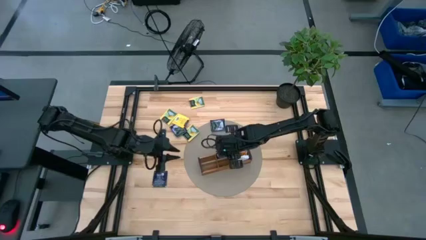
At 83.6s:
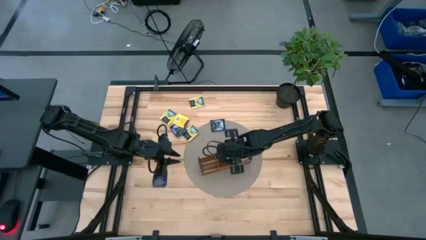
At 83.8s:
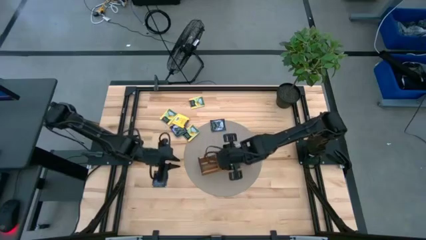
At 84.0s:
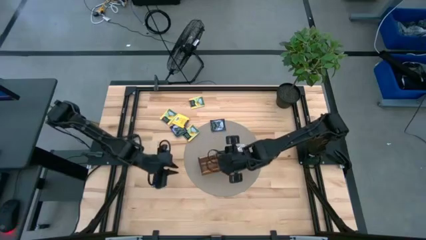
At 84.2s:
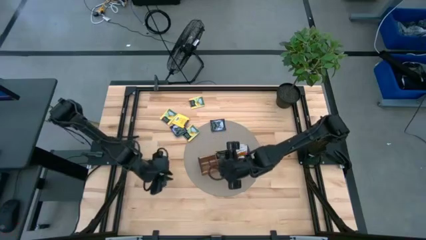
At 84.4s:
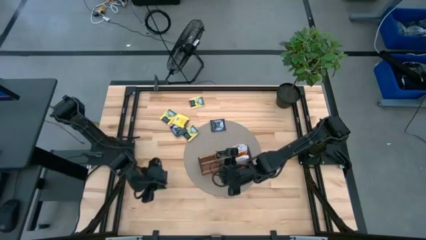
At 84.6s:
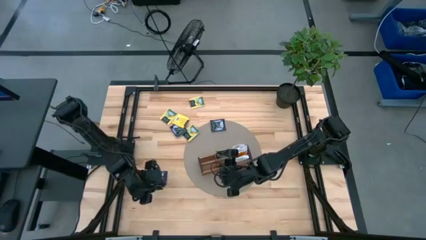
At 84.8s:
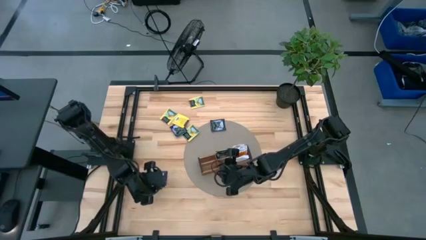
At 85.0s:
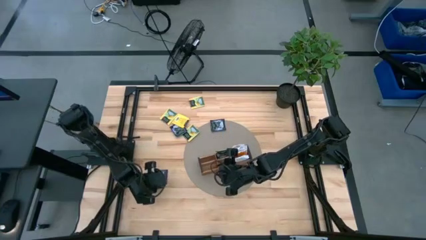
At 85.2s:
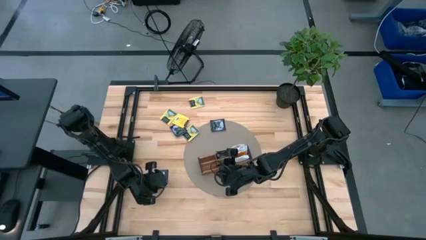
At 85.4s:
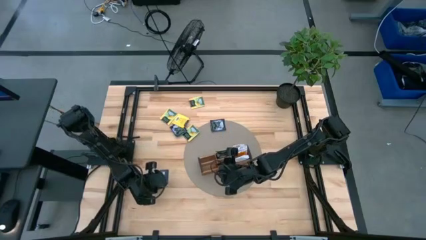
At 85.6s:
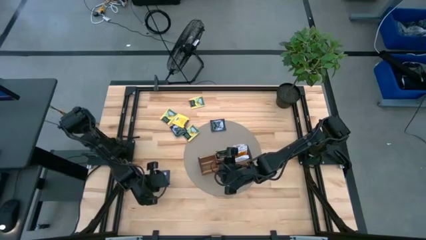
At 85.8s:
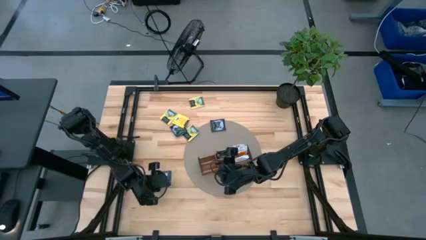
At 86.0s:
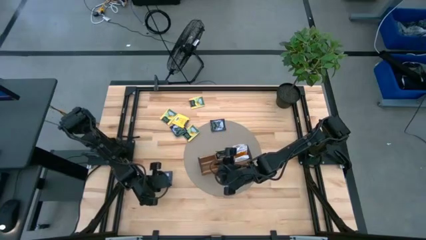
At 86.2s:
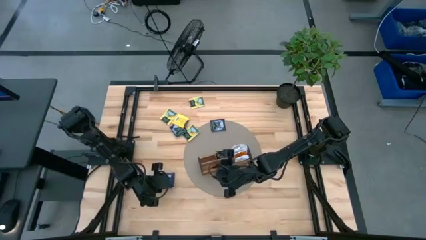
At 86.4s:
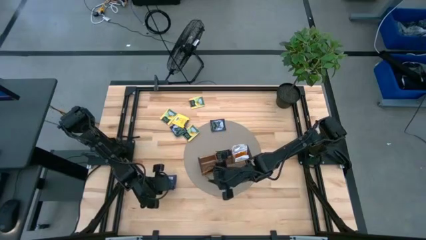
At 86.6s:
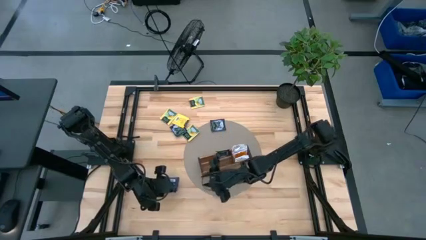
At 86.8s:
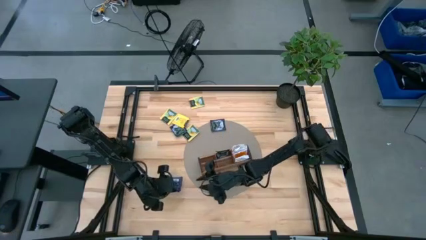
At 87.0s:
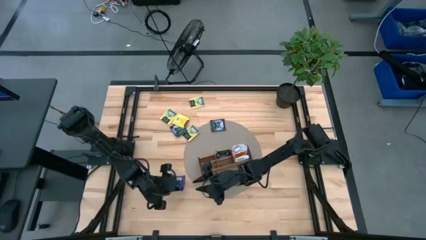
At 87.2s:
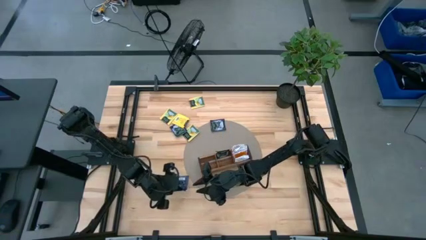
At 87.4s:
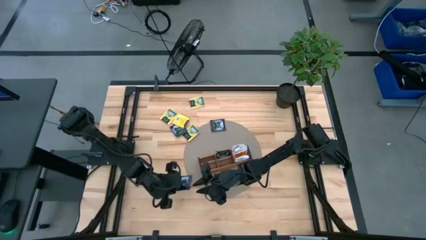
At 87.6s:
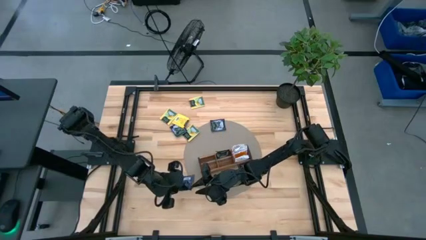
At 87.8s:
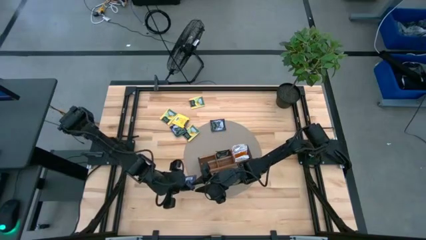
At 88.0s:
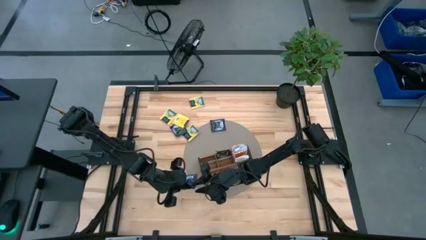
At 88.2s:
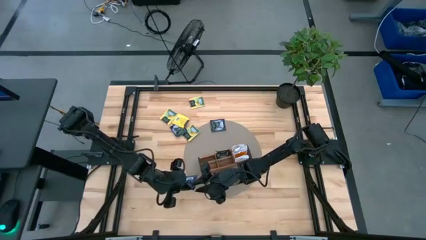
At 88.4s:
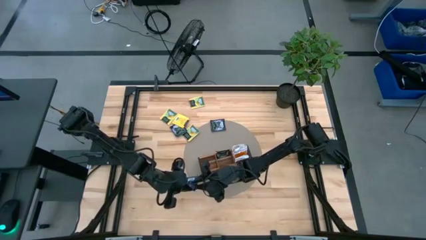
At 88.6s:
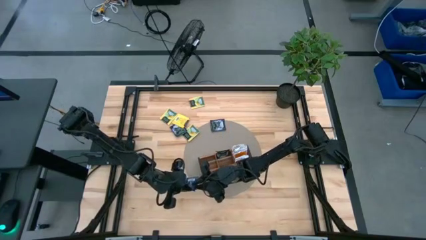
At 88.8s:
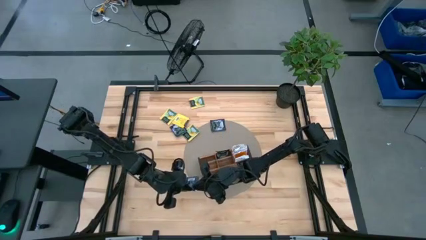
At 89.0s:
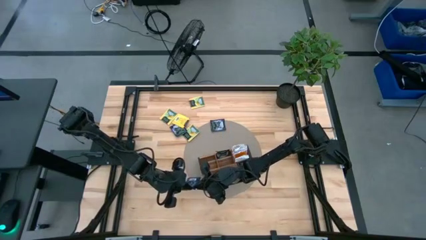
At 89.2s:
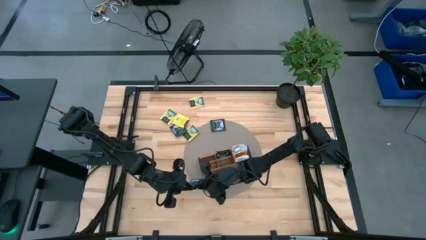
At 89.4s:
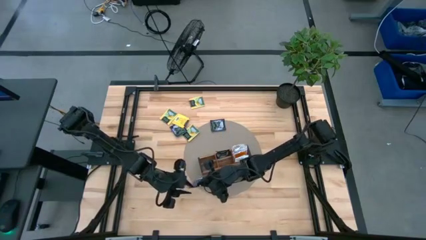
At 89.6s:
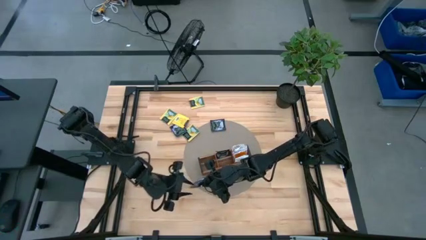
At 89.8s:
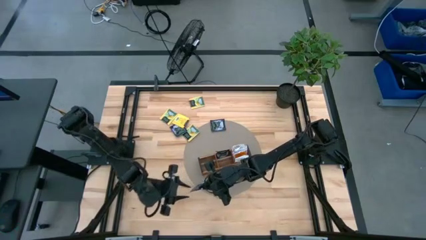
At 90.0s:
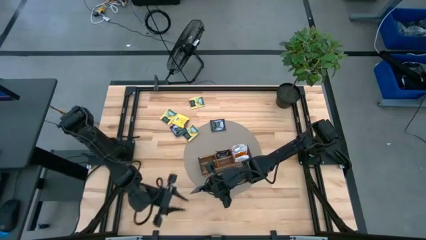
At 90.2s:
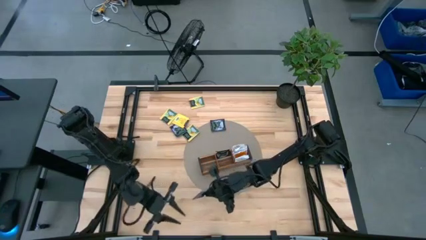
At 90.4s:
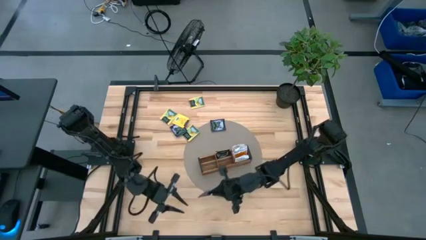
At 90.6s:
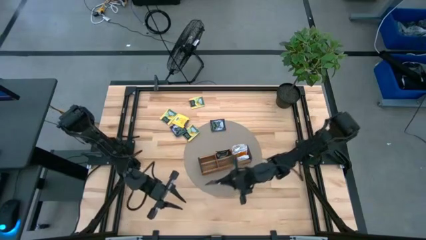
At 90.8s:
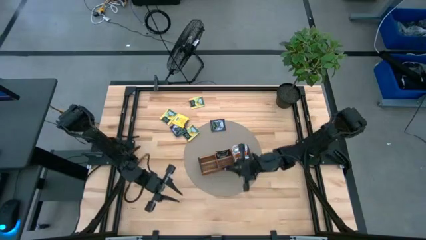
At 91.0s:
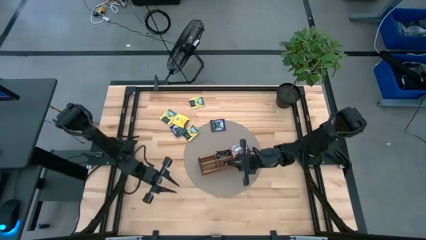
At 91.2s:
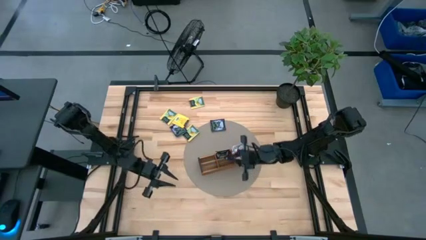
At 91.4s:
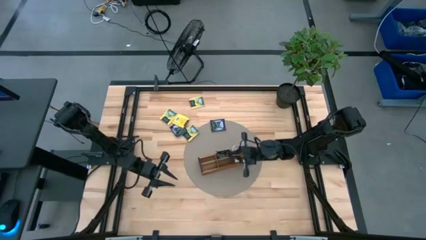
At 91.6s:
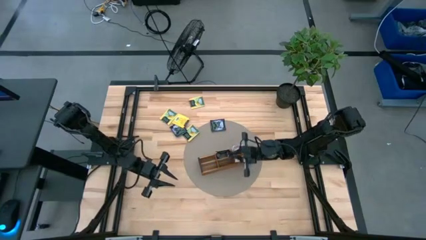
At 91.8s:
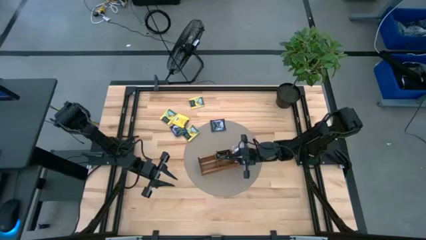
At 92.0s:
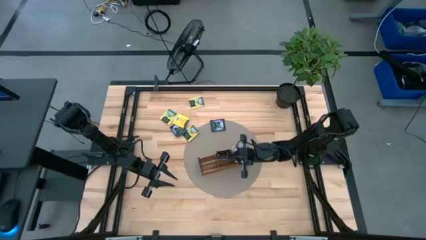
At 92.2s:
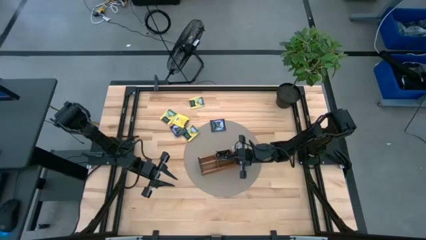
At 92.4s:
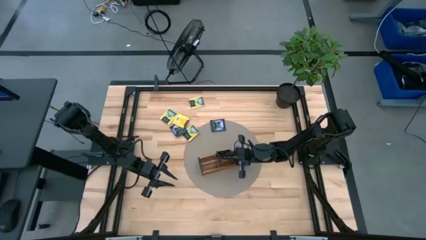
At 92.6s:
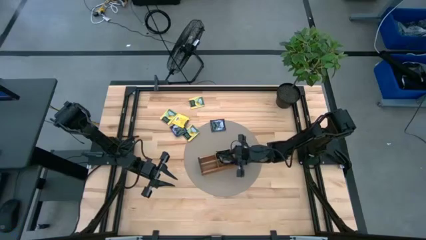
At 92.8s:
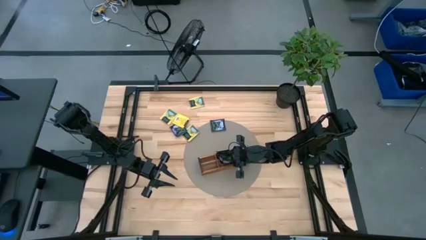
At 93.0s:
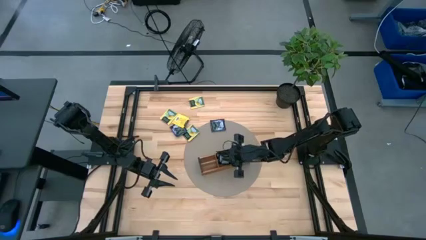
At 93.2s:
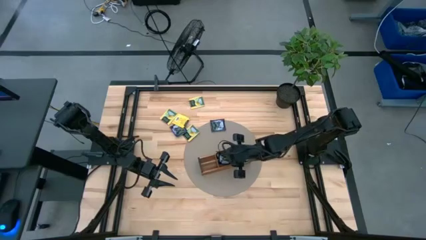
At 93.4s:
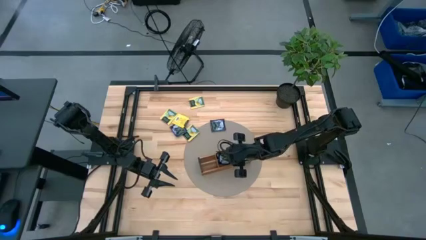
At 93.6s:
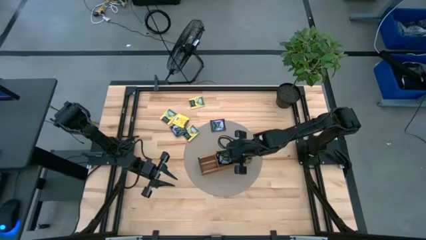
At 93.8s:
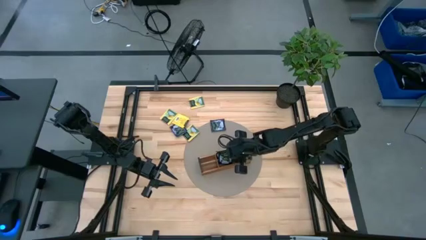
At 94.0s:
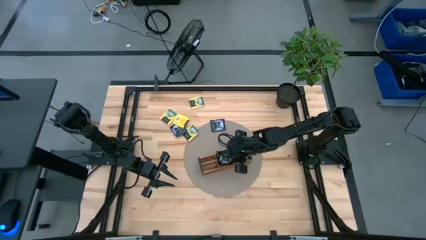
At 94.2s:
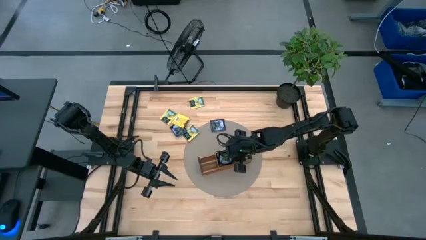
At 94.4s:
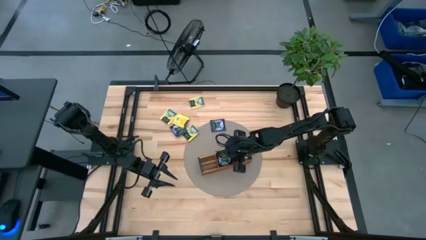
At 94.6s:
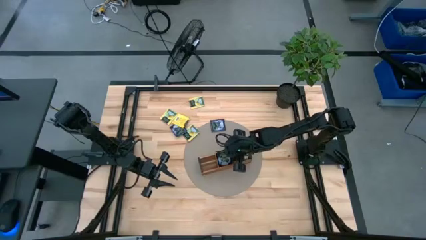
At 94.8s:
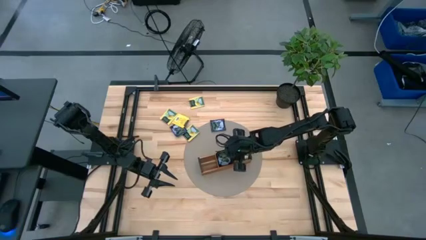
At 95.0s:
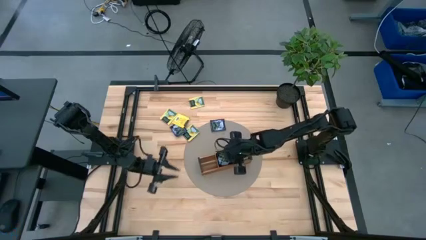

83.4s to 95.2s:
Task: Pick & Place Tea
Put the purple tea bag into the middle section of the wooden organizer

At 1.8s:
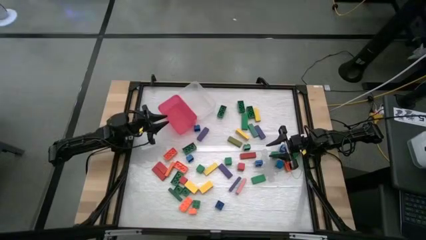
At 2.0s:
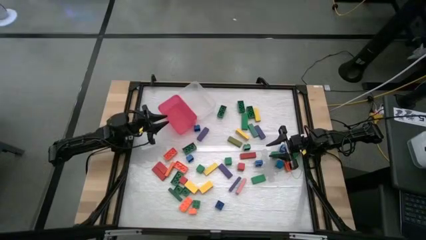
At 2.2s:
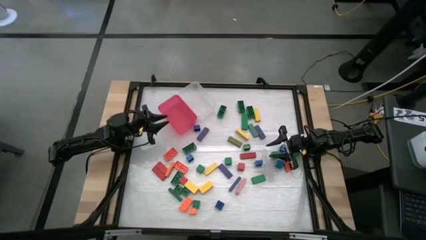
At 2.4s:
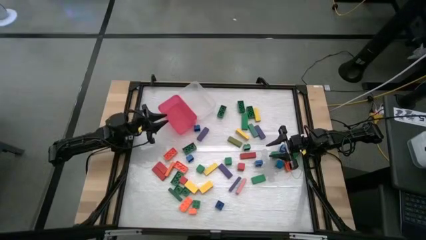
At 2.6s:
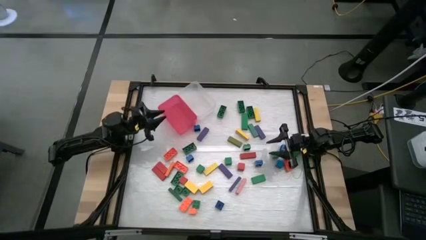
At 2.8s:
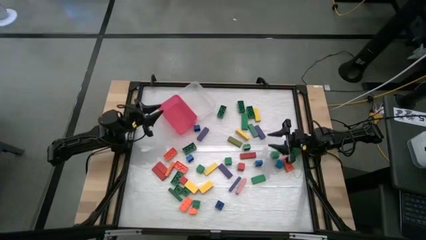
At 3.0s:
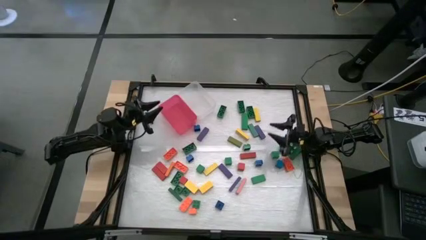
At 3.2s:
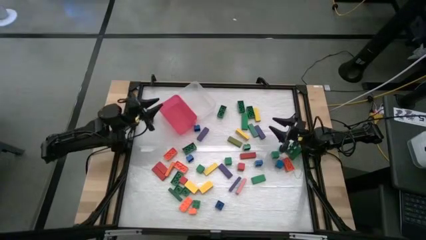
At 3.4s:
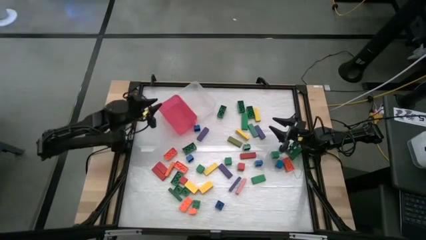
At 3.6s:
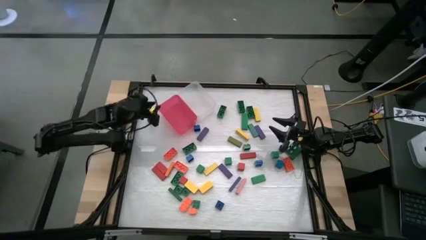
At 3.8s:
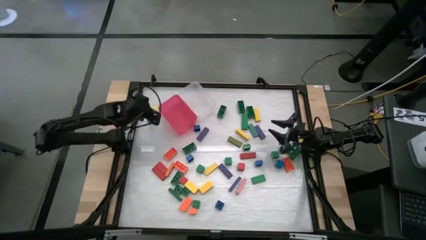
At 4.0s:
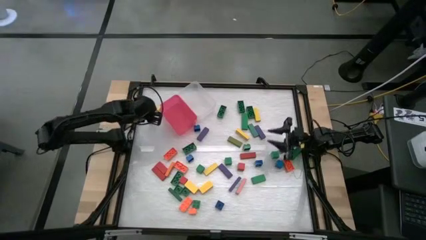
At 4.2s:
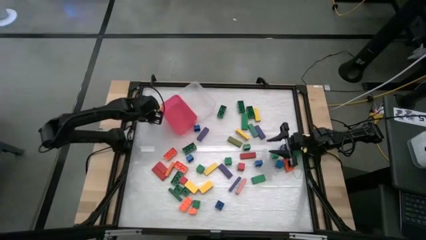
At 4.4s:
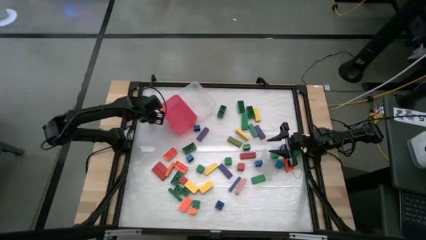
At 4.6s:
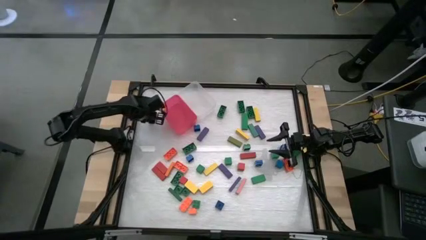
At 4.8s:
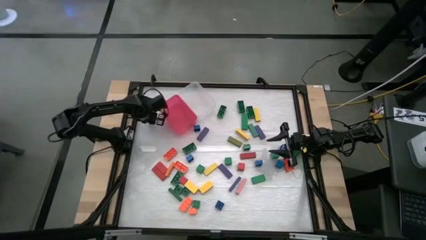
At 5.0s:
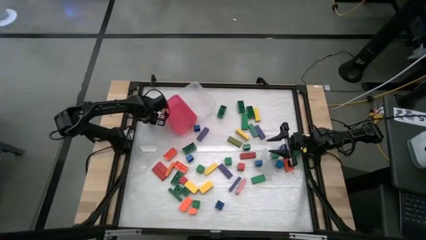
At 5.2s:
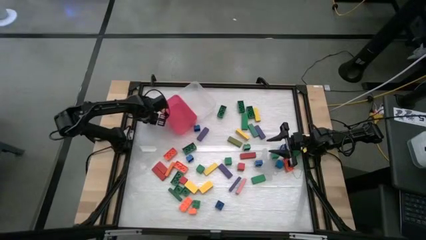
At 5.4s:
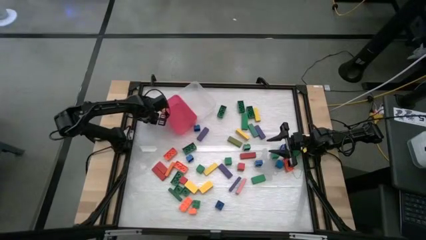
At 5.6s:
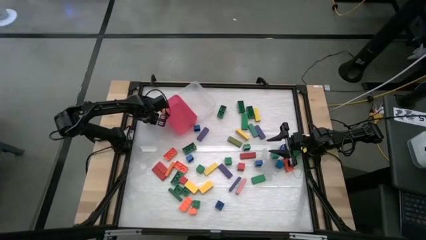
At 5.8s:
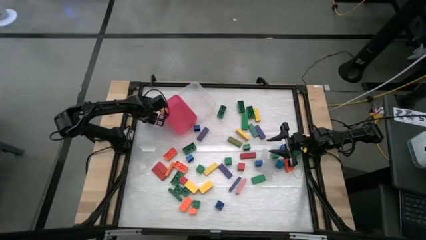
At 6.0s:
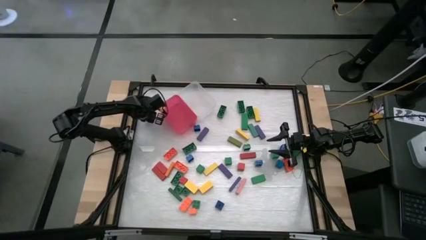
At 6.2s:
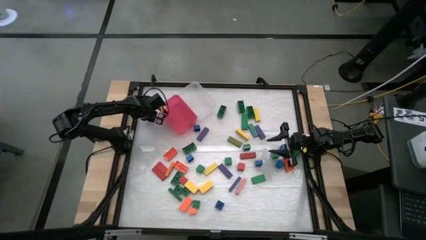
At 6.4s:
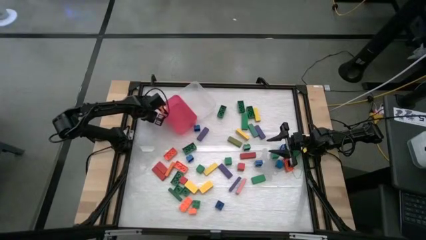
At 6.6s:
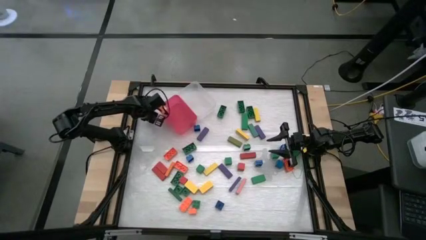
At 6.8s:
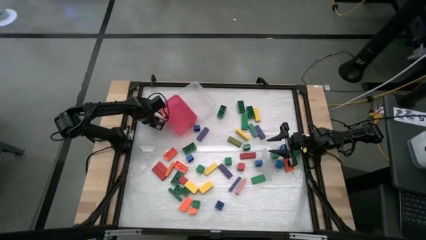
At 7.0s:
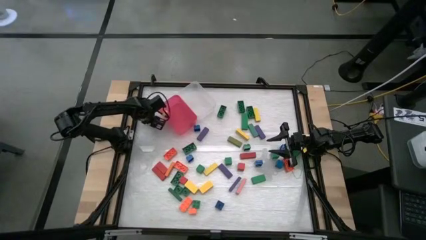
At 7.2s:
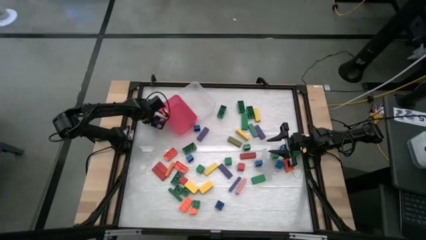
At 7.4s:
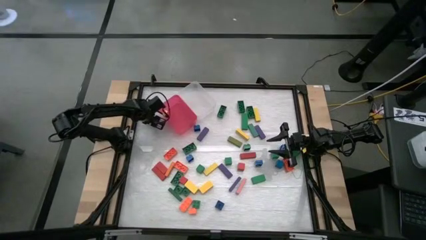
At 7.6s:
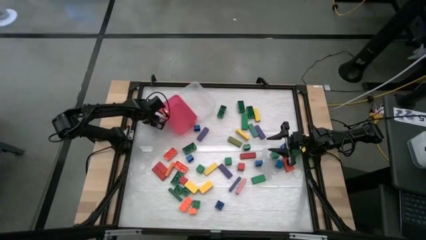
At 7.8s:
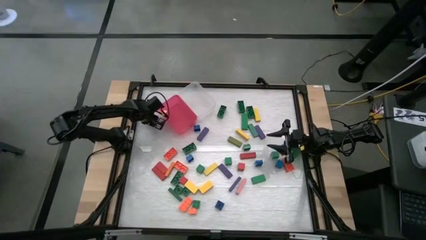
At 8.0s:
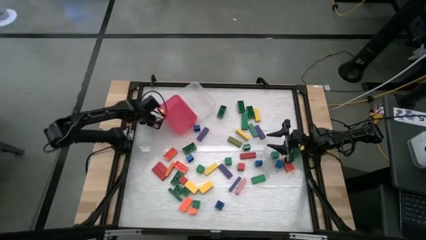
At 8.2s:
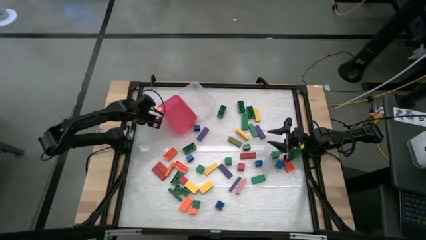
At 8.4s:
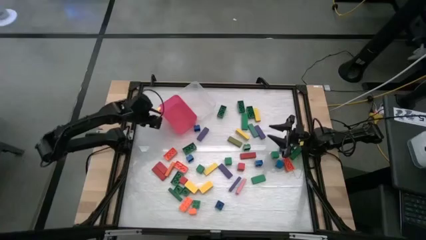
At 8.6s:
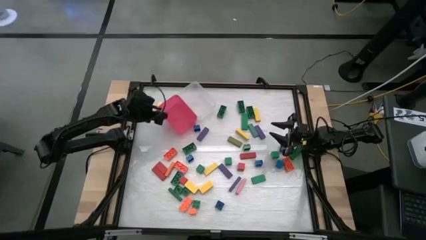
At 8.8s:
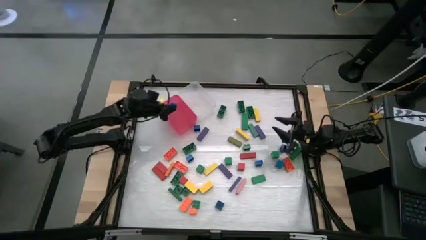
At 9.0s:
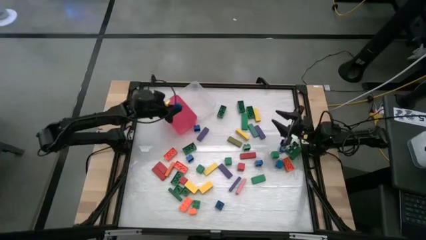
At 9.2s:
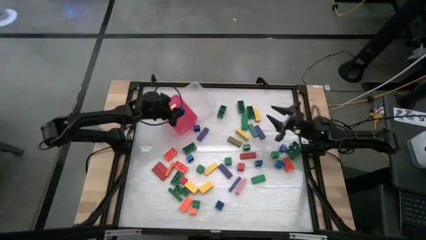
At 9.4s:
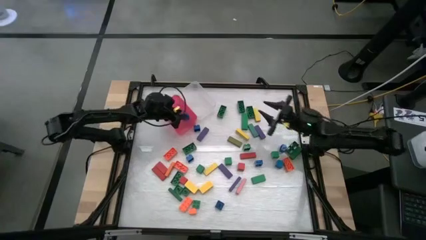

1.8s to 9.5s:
Task: Sort blocks by size
Put the small blue game piece into the pink bin
